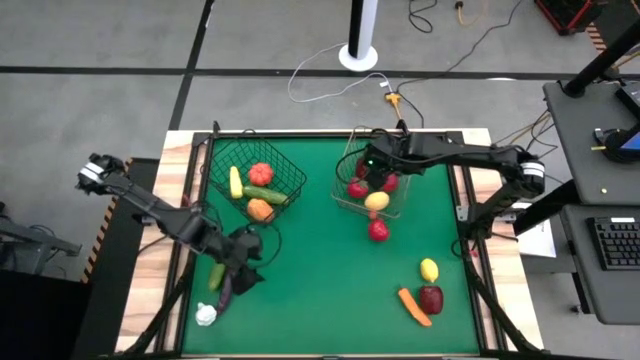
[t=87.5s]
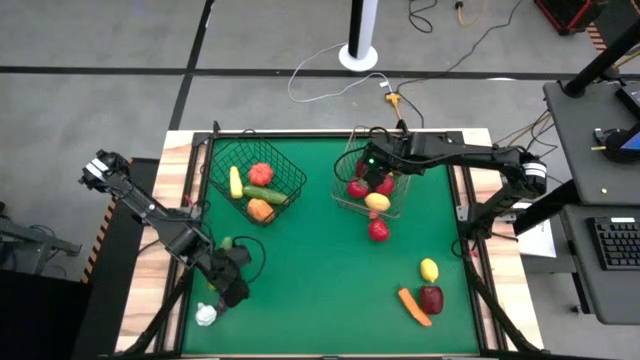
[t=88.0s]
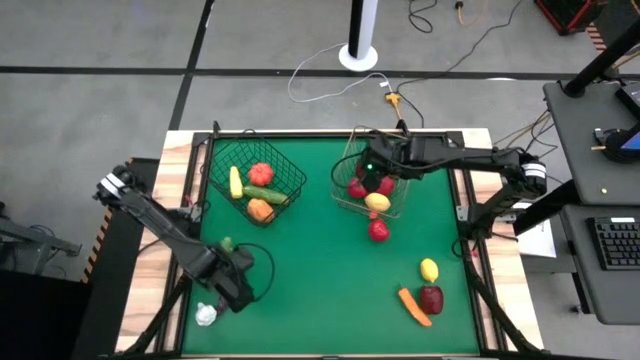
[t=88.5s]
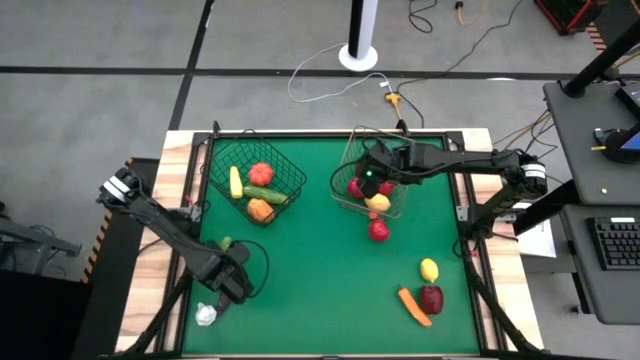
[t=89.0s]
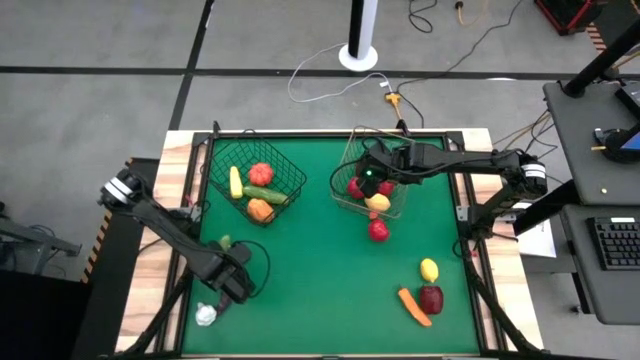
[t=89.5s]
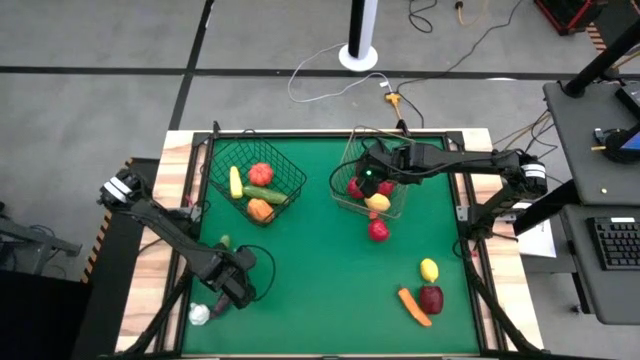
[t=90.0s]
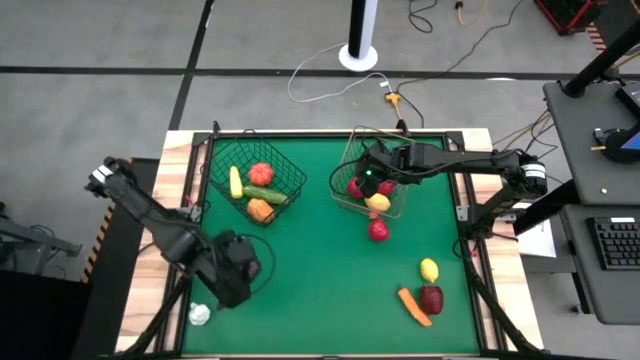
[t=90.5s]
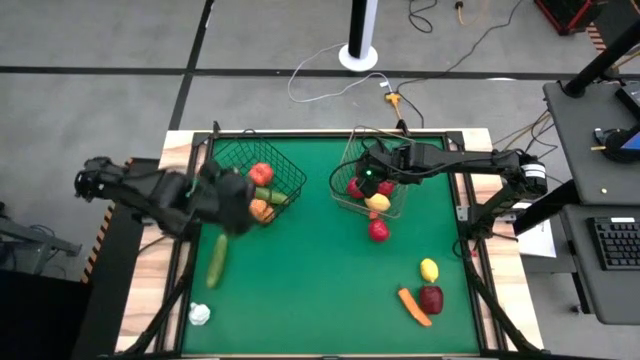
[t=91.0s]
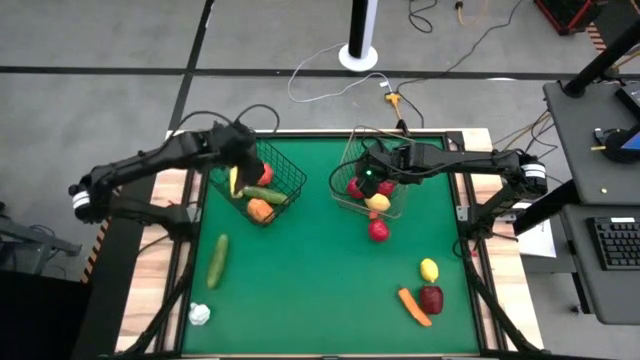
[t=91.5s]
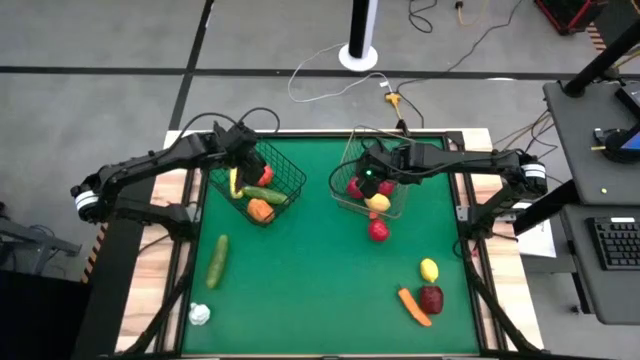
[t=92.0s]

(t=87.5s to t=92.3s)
Task: Sort produce into baskets
Put the violet eggplant into the black wire basket

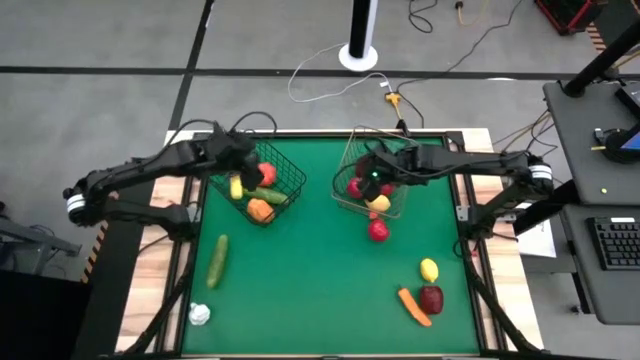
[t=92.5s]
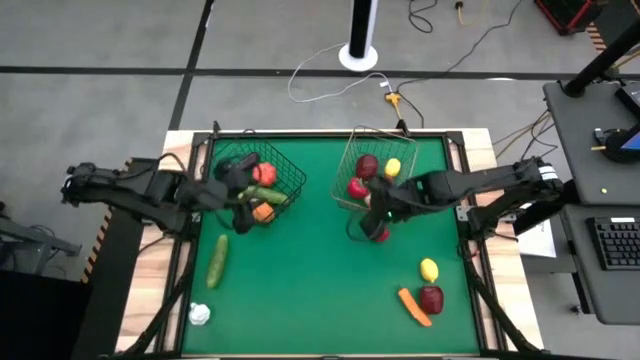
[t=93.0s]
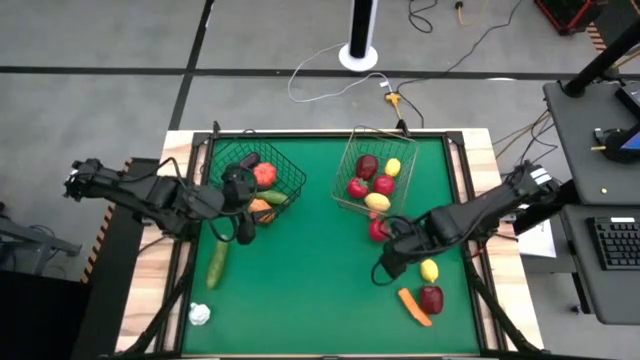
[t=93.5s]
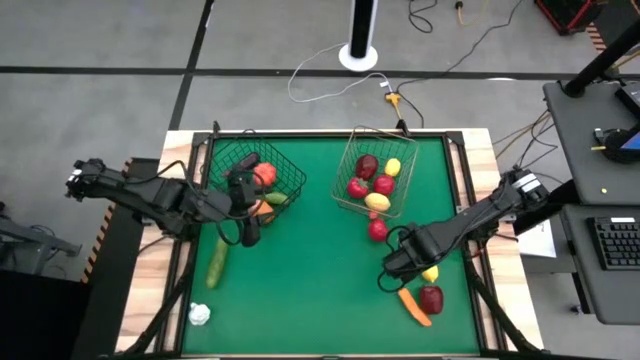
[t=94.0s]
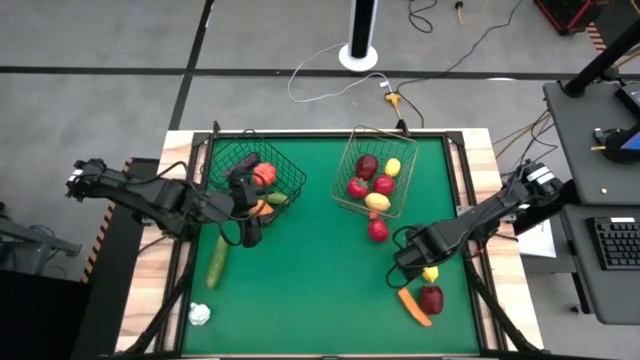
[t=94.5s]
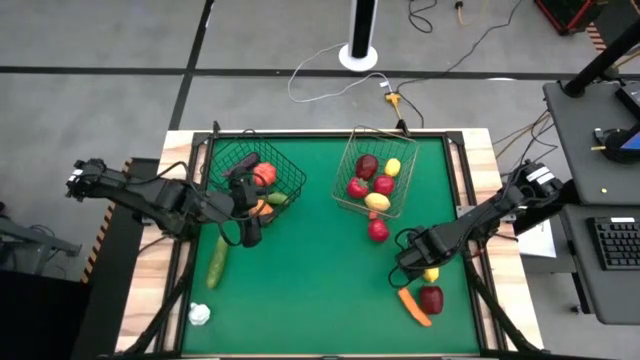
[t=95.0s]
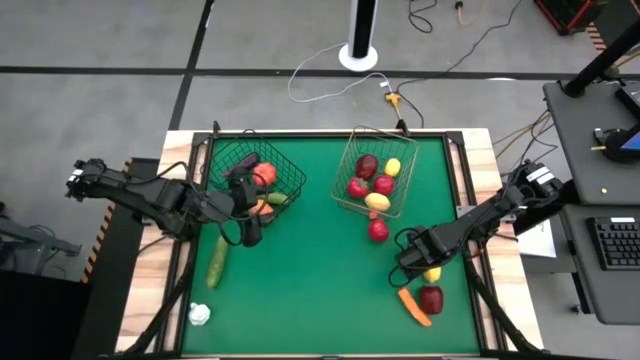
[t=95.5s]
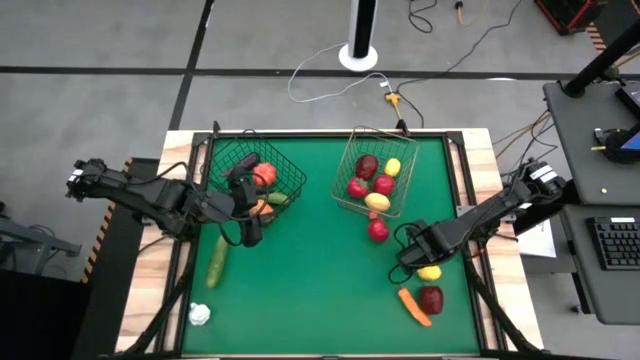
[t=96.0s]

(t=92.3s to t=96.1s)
Put the yellow lemon into the gold wire basket

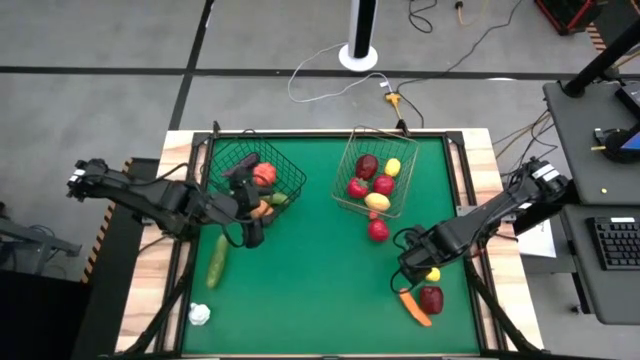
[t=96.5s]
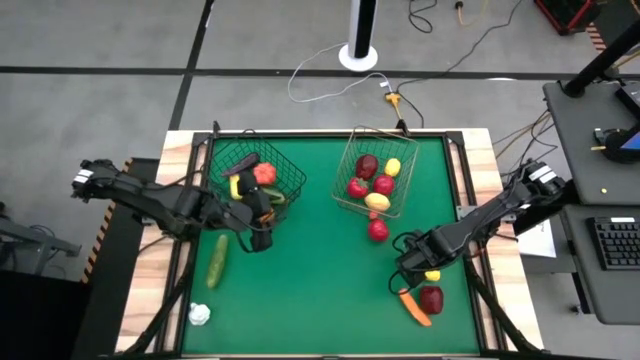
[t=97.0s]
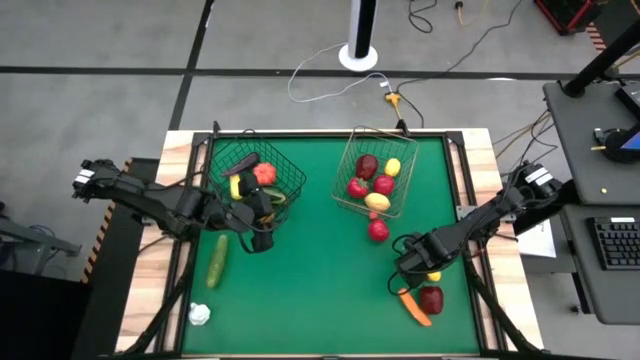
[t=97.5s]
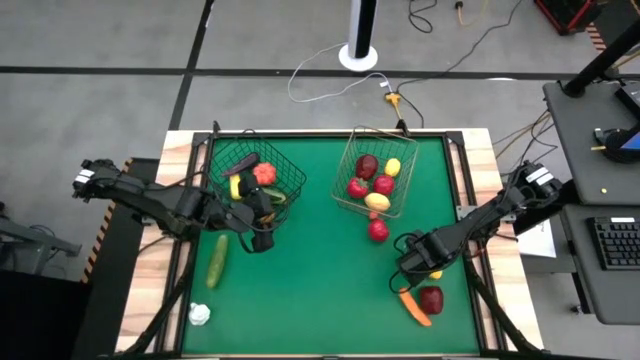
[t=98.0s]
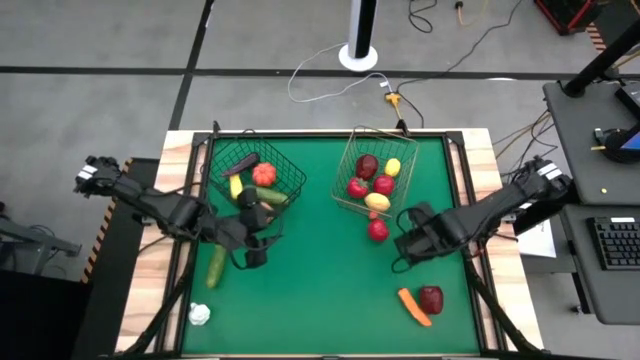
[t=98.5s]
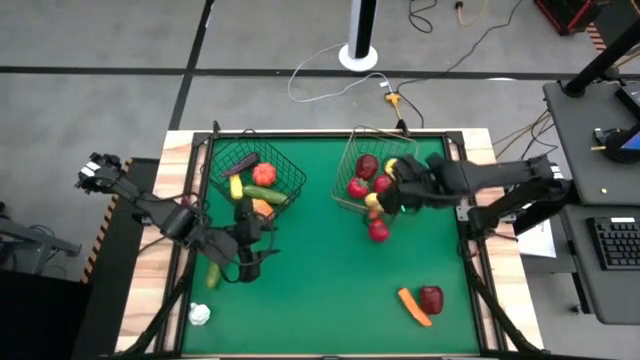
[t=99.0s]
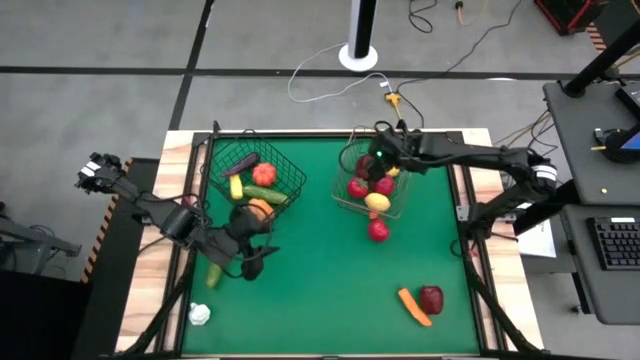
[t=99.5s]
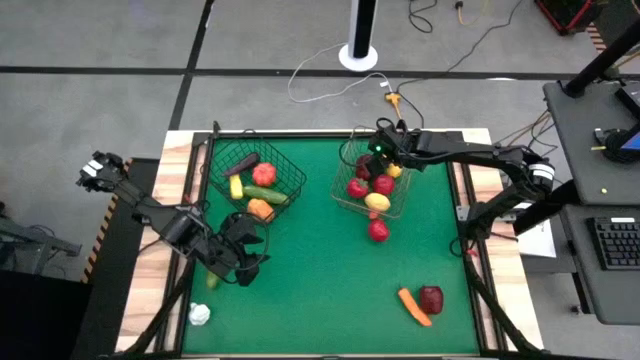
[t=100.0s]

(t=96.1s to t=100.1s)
Put the yellow lemon into the gold wire basket

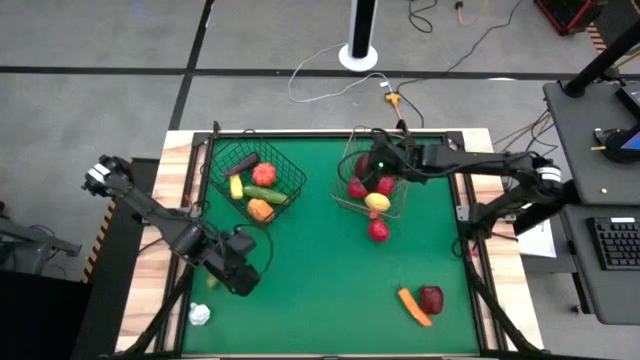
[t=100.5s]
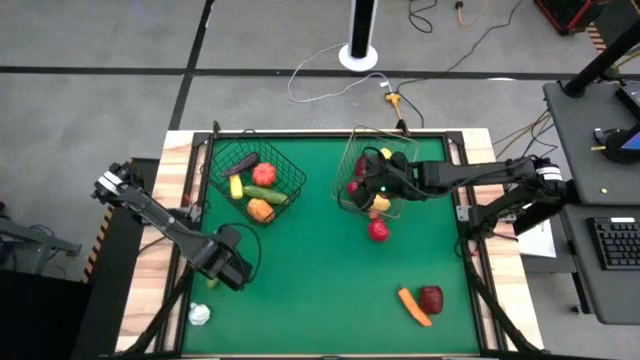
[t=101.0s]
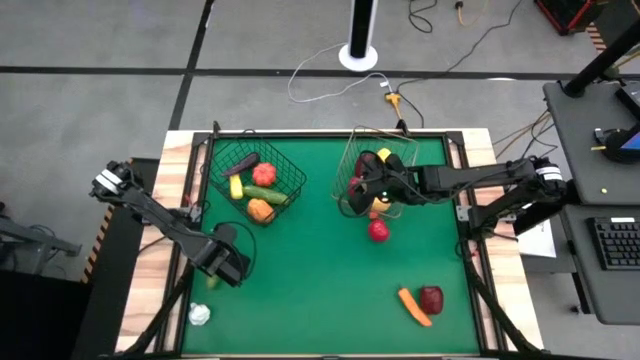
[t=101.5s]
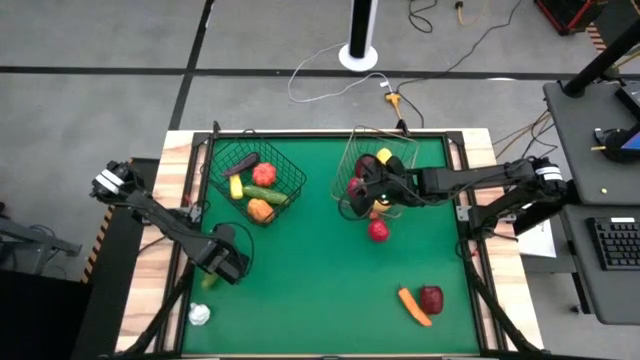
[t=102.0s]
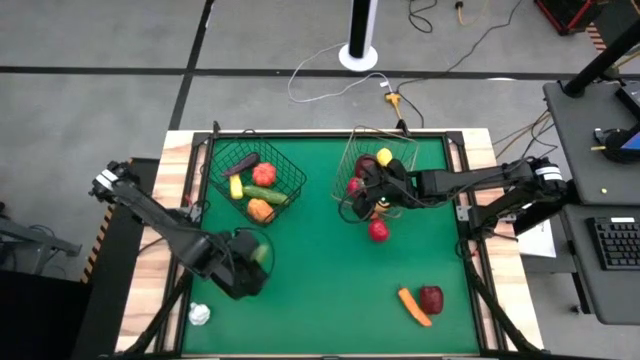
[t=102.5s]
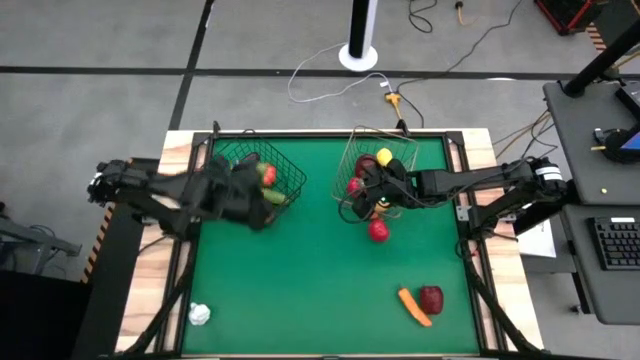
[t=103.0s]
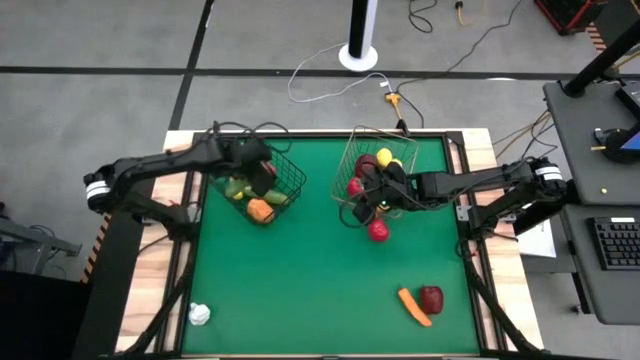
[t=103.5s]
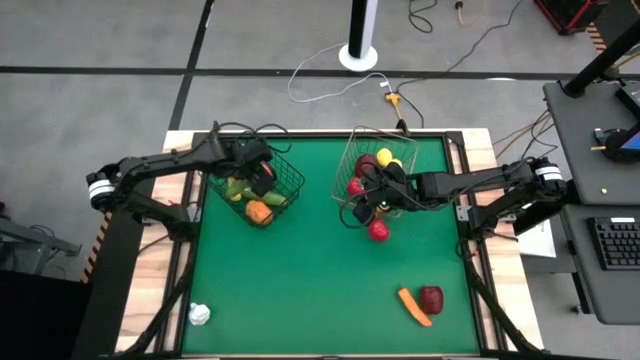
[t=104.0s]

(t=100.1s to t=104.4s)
Put the green cucumber into the black wire basket

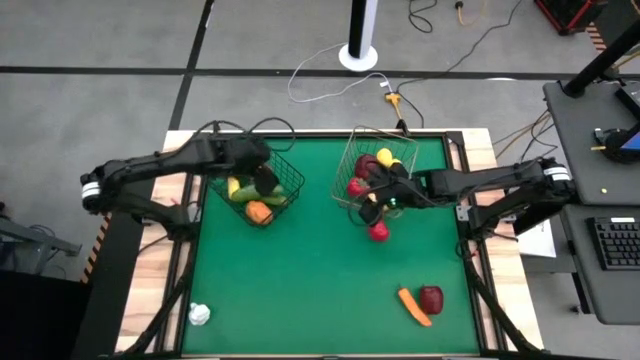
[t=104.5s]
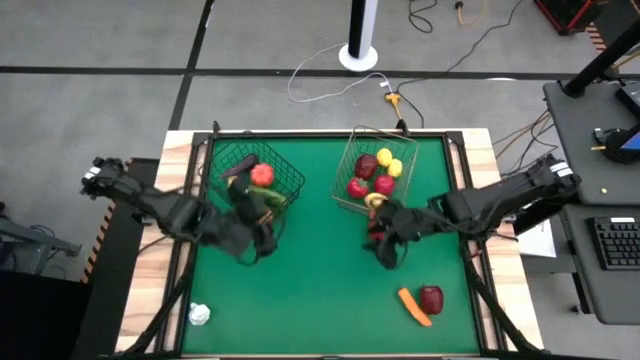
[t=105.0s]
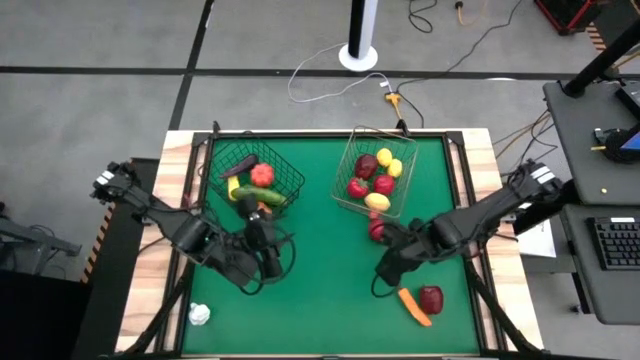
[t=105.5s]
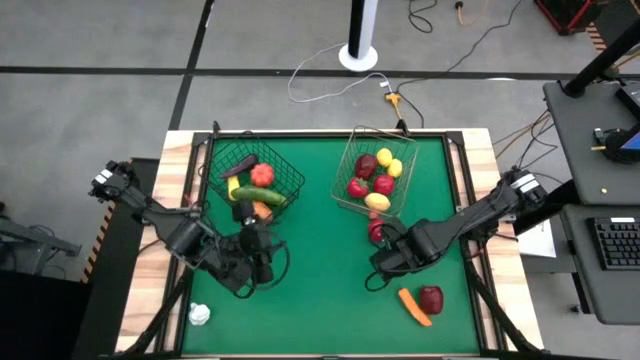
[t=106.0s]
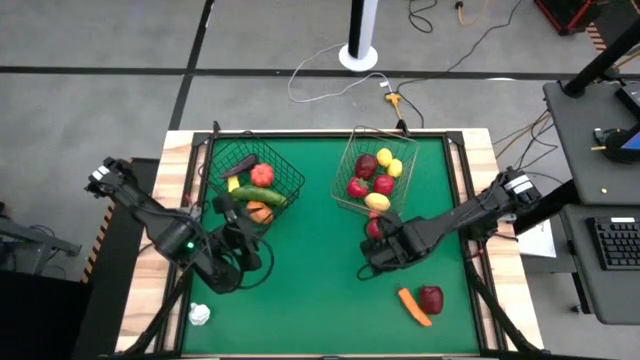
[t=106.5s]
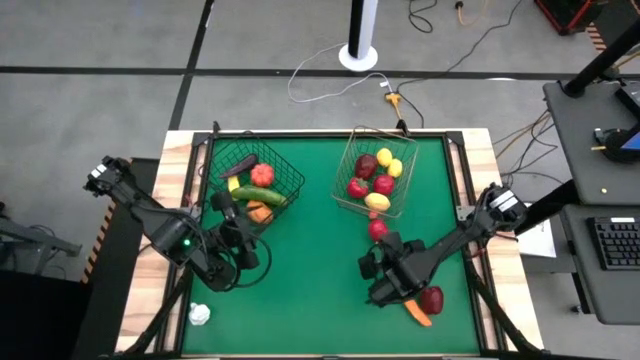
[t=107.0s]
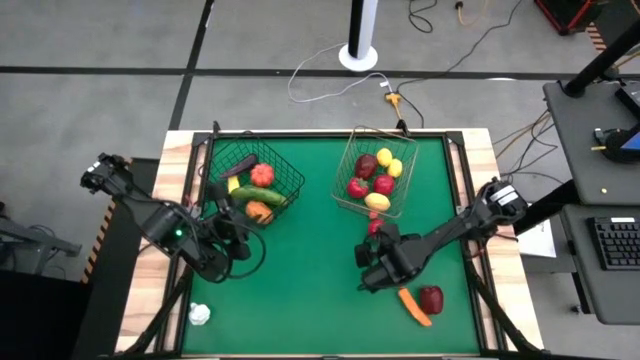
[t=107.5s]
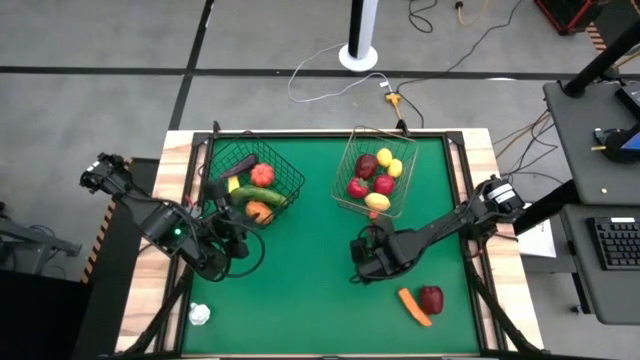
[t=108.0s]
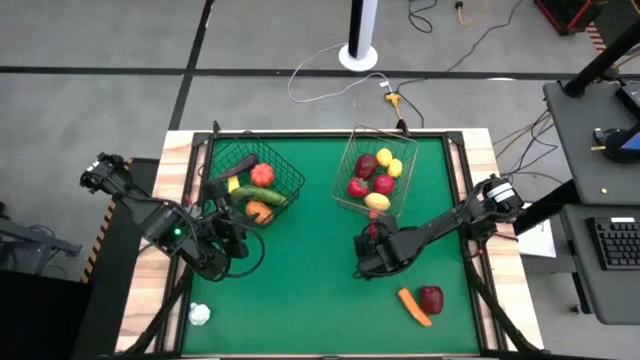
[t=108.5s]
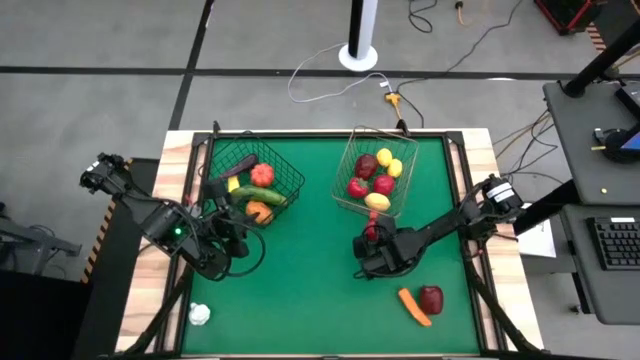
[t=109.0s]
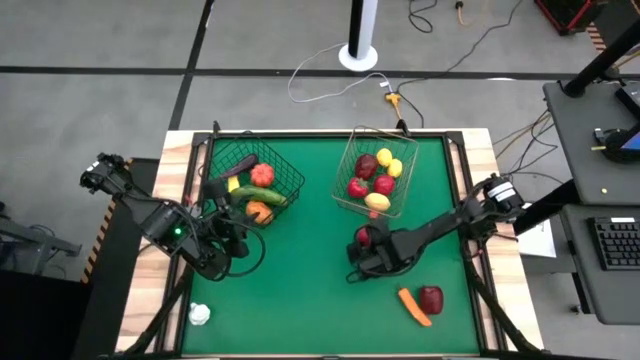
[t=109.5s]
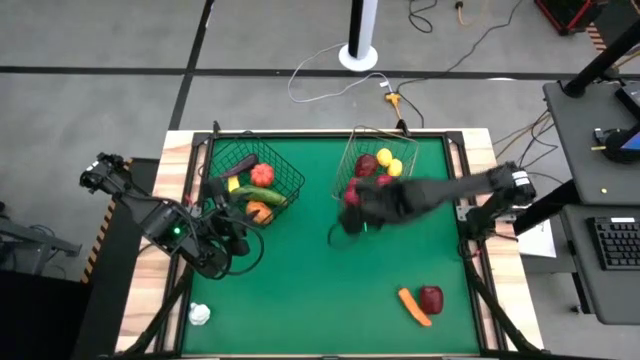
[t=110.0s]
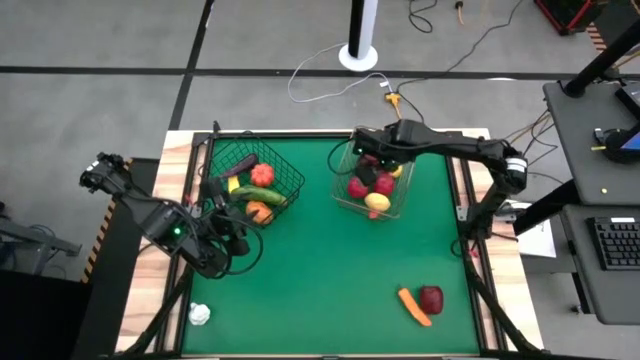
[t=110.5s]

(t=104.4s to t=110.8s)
Put the red tomato into the gold wire basket
